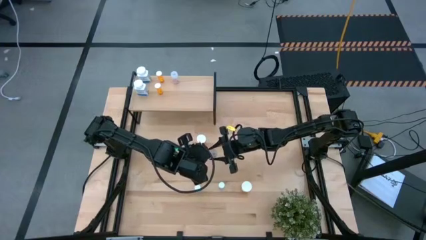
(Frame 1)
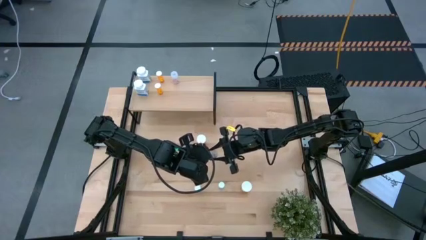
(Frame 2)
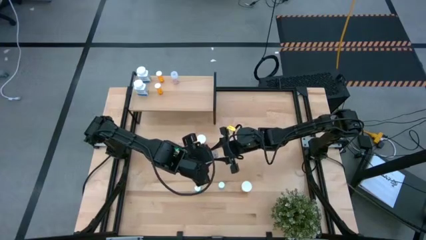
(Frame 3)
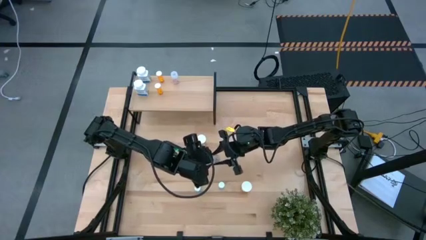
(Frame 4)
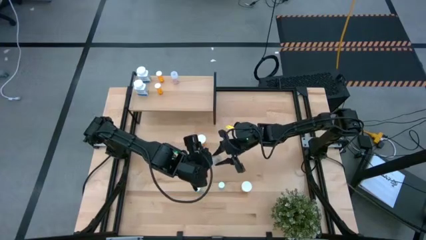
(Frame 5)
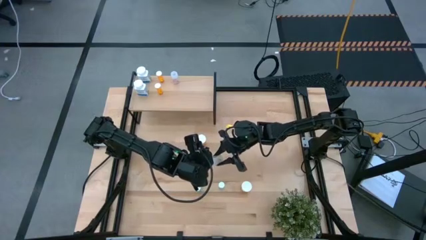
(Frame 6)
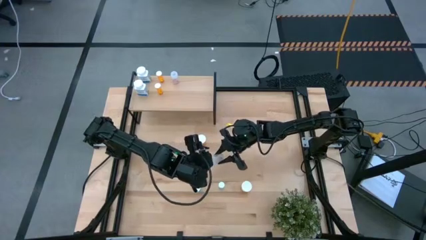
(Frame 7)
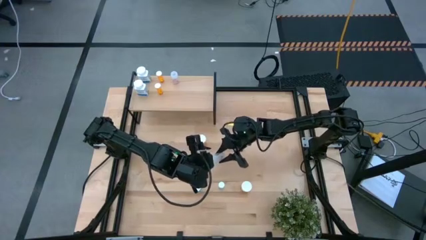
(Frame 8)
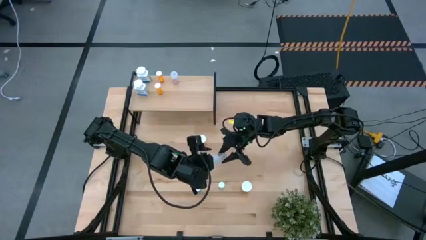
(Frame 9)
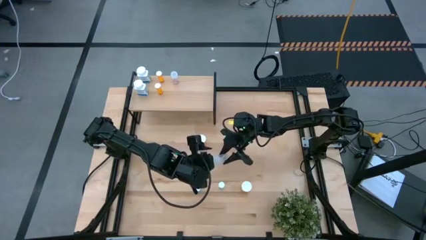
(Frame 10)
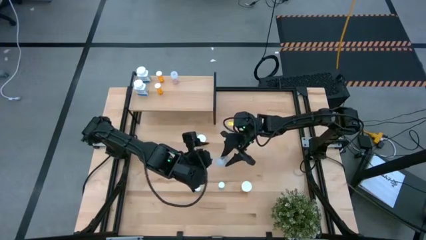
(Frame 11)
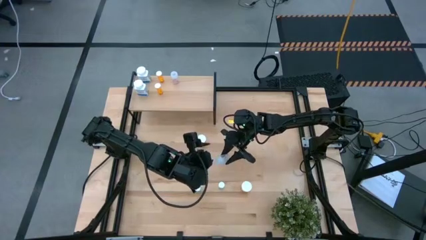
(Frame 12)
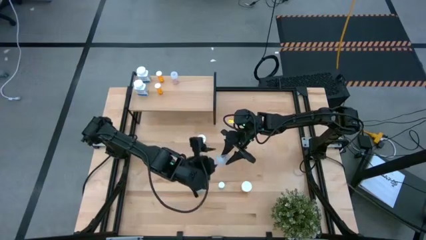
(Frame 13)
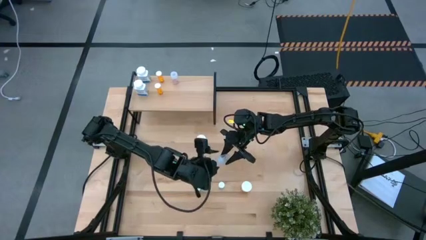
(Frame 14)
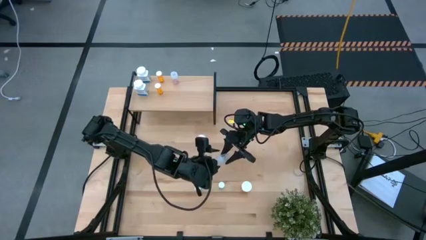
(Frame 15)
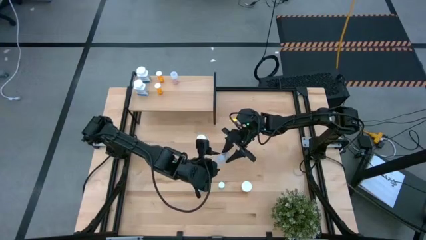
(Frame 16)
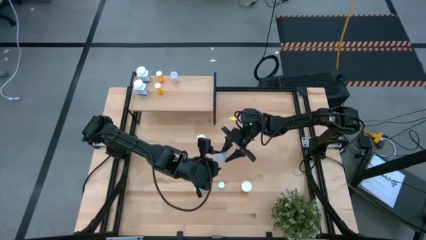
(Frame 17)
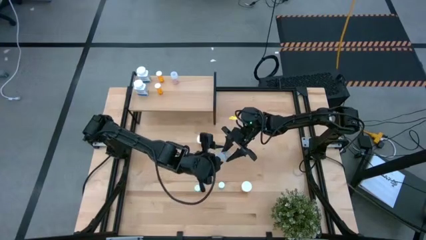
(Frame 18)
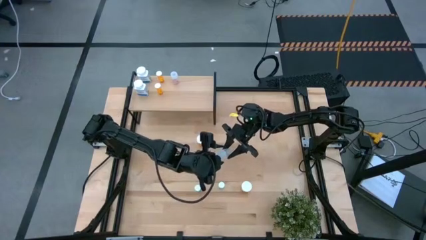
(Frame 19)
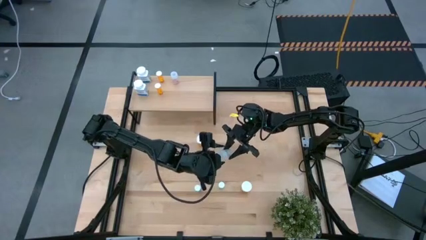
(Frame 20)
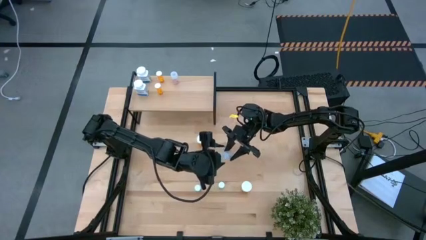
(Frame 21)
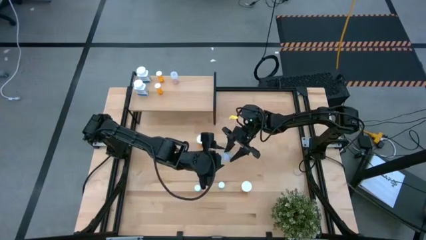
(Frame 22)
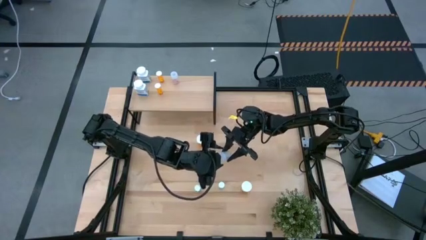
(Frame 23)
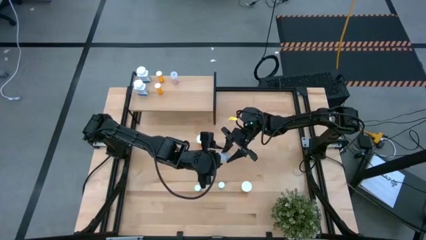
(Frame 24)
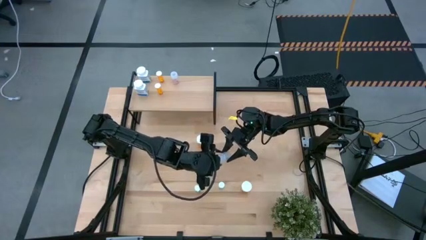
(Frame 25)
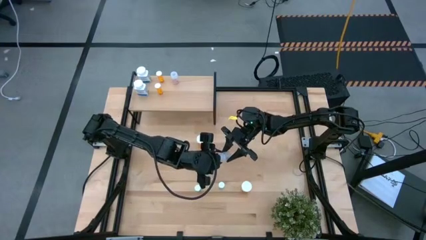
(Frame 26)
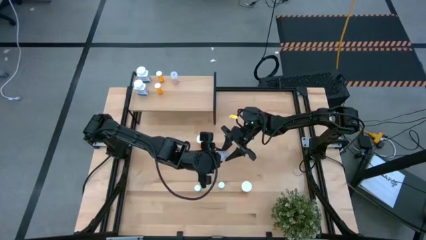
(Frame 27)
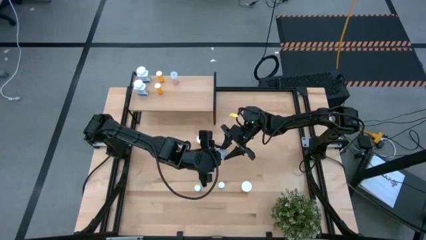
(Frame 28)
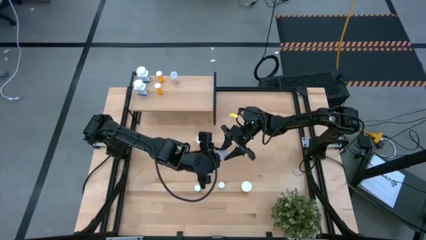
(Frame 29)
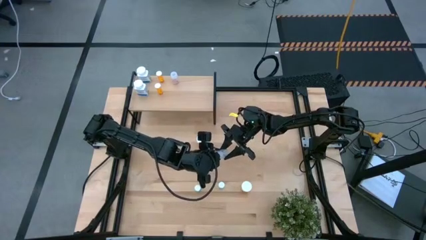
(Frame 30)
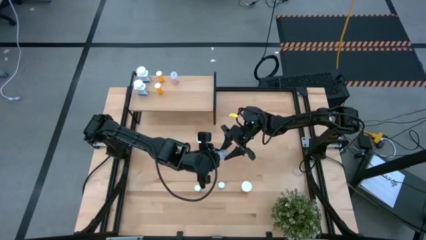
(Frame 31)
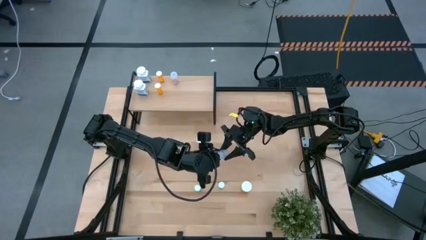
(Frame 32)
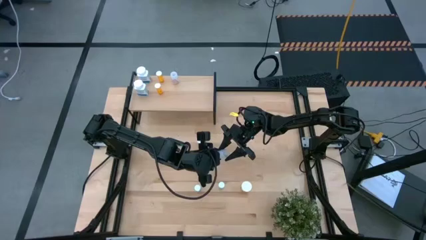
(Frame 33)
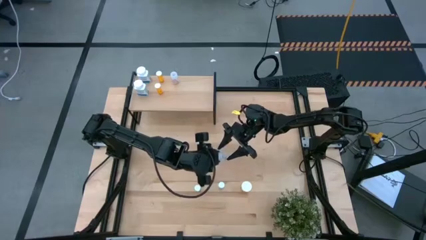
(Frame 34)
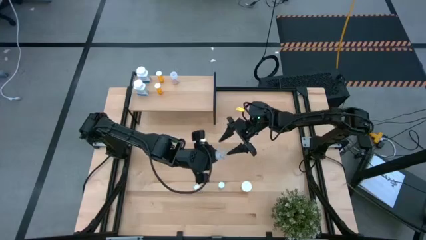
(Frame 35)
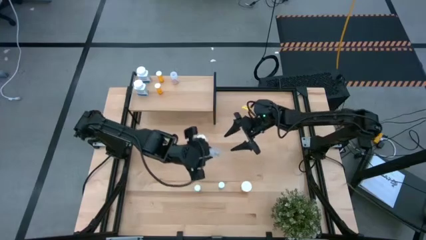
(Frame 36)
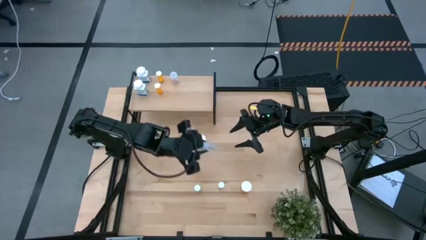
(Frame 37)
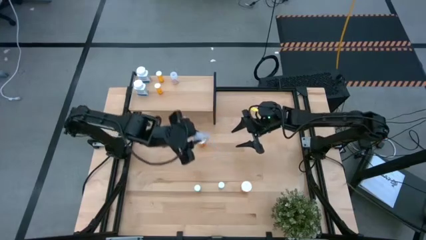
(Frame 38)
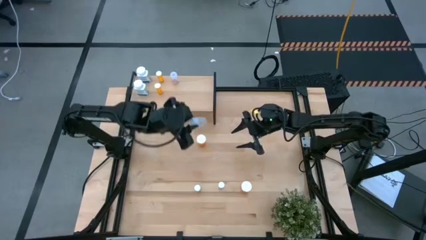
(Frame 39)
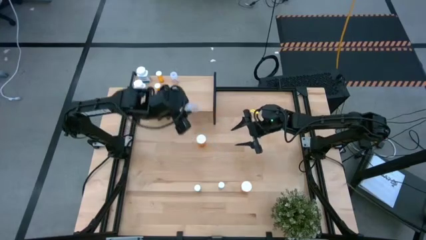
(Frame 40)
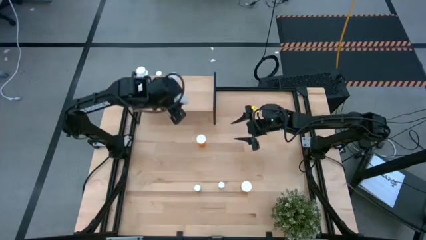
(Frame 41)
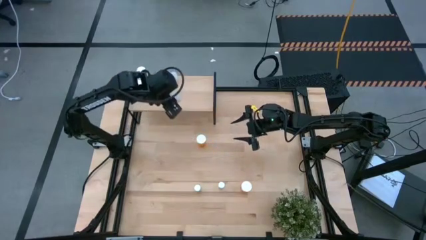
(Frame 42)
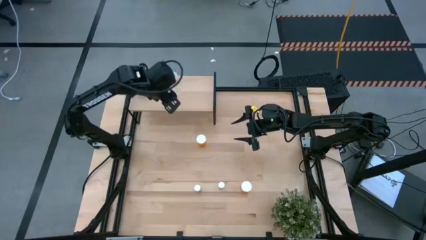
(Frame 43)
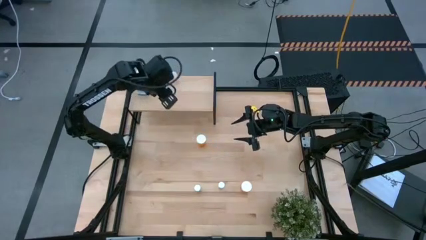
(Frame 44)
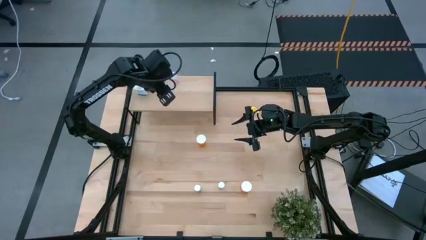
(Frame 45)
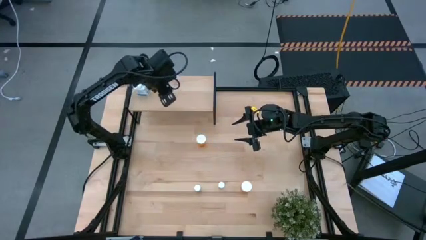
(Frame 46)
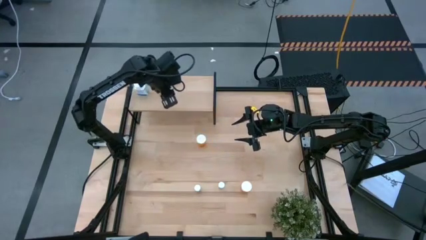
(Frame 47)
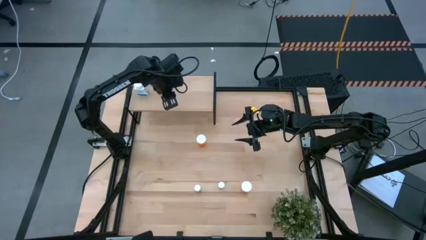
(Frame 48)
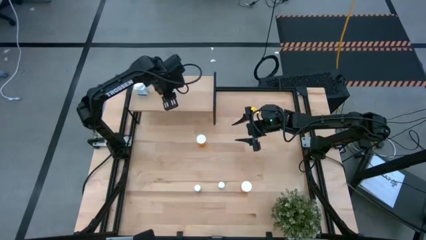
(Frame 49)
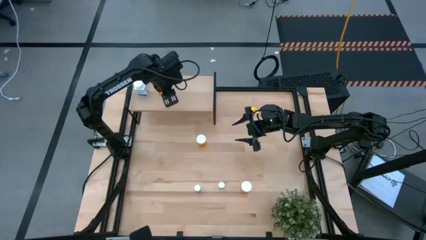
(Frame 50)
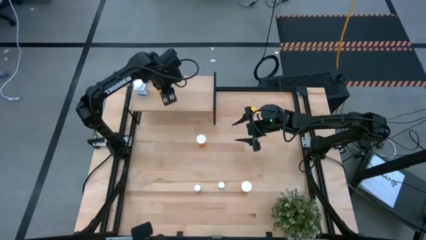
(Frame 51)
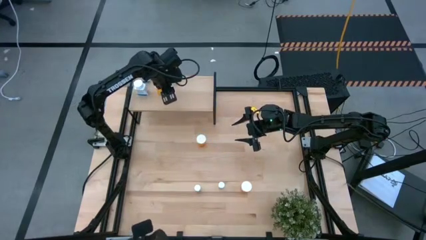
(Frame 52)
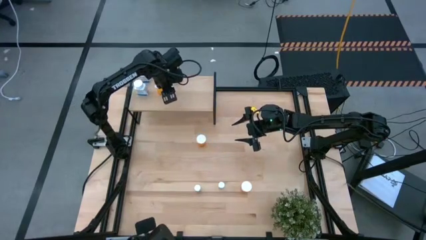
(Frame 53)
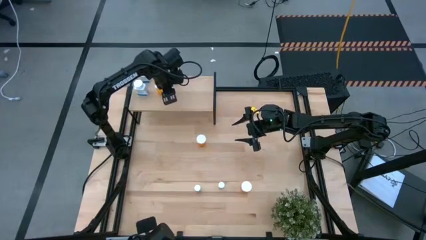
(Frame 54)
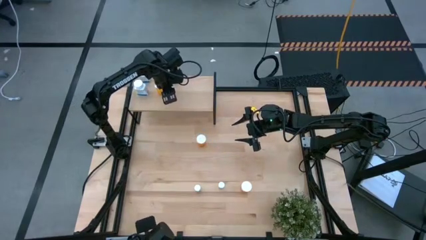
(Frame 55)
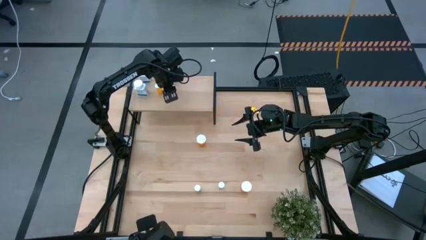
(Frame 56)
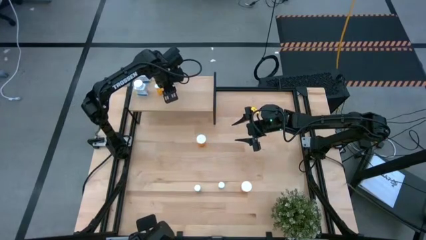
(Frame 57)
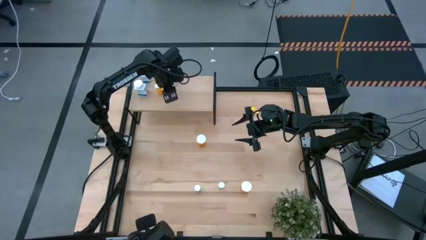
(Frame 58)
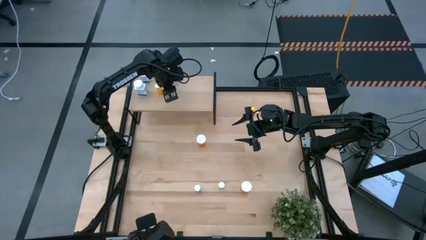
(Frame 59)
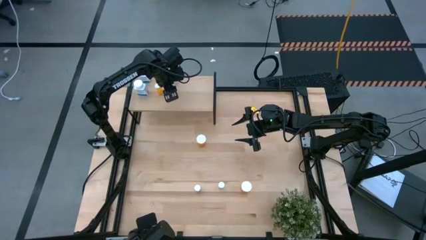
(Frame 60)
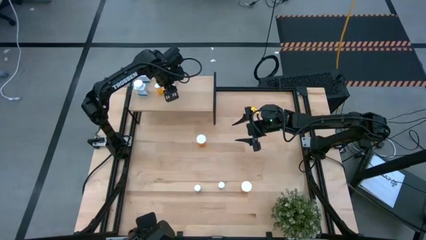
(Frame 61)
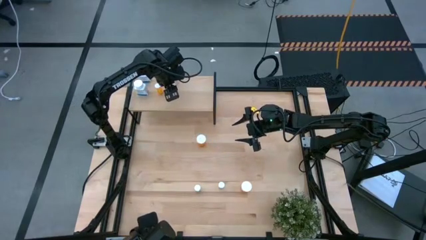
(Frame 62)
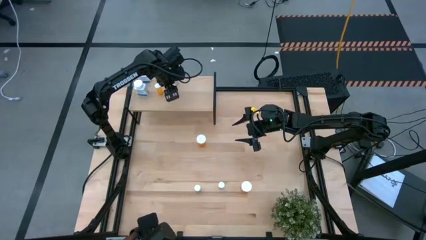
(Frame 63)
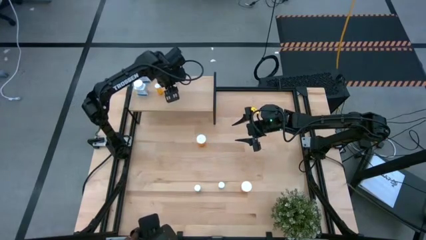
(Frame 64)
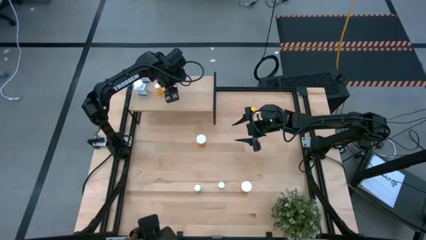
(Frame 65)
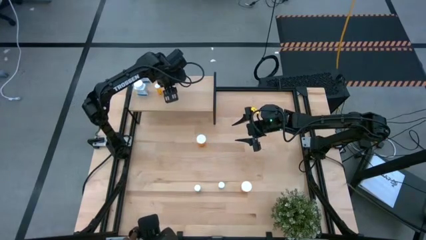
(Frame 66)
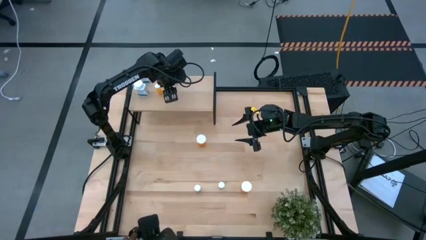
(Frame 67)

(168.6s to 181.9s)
Task: Pick and place medicine bottles onto shelf by color
Put the transparent pill bottle on the shelf aligned with the other transparent pill bottle

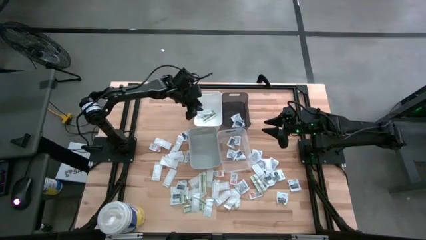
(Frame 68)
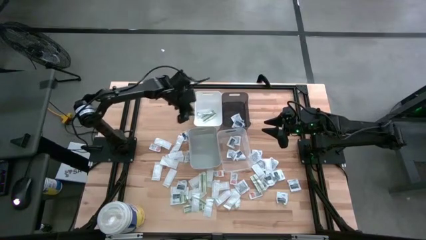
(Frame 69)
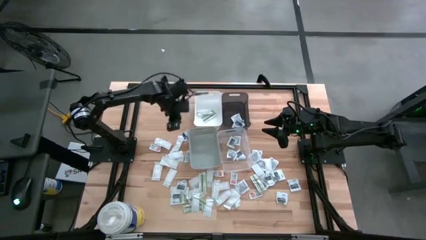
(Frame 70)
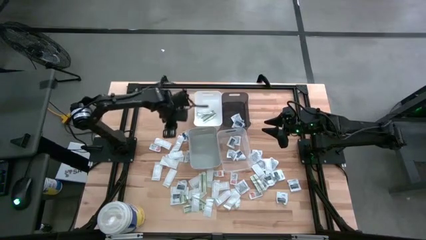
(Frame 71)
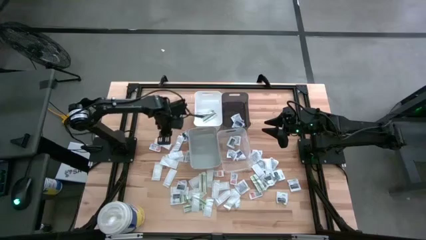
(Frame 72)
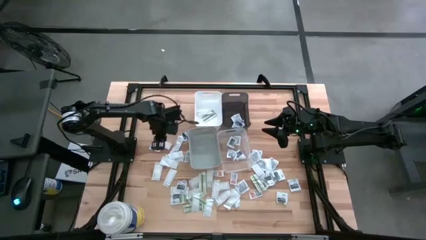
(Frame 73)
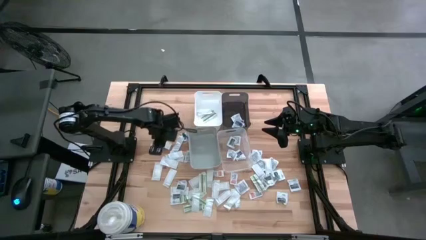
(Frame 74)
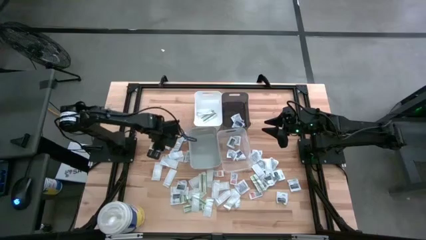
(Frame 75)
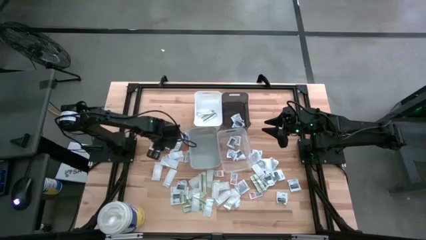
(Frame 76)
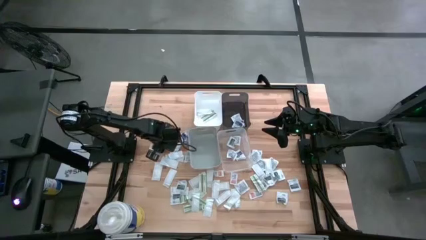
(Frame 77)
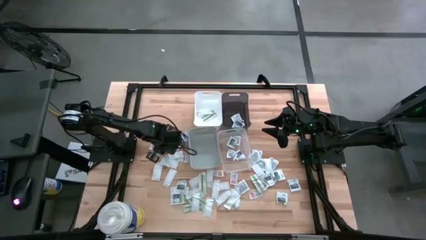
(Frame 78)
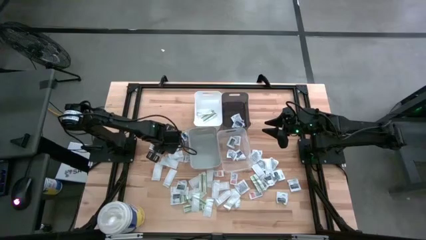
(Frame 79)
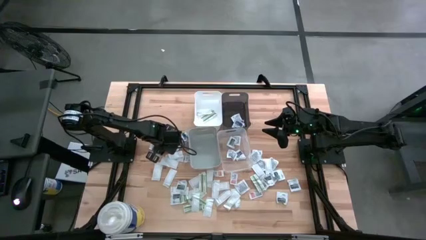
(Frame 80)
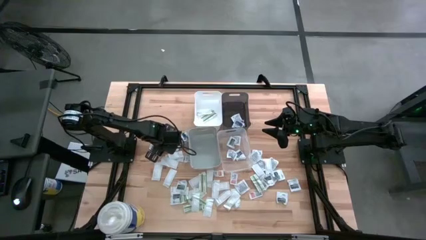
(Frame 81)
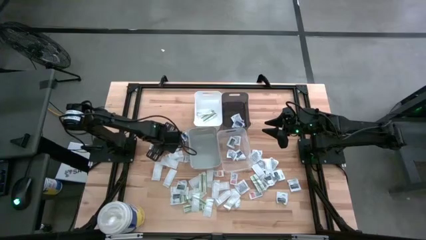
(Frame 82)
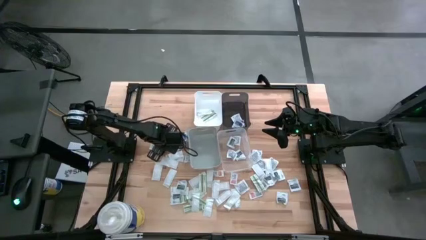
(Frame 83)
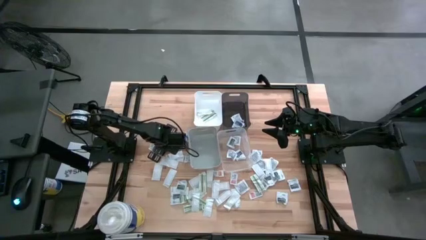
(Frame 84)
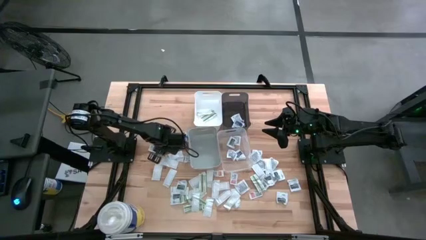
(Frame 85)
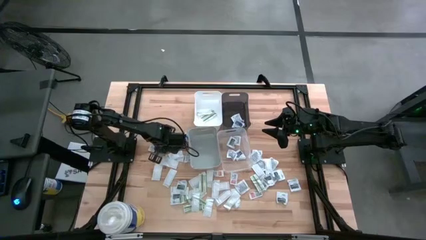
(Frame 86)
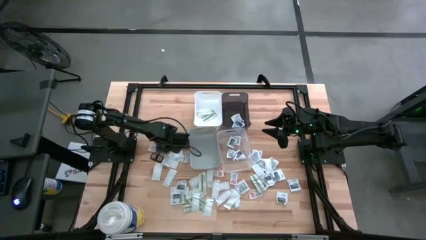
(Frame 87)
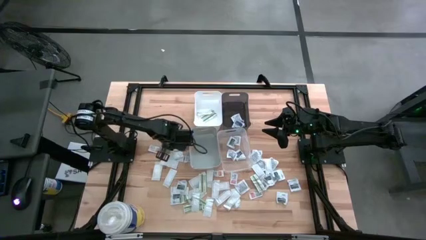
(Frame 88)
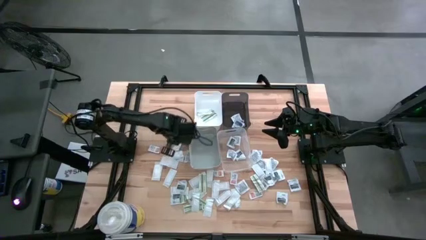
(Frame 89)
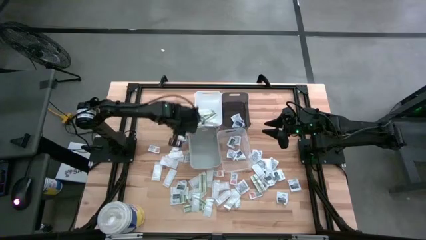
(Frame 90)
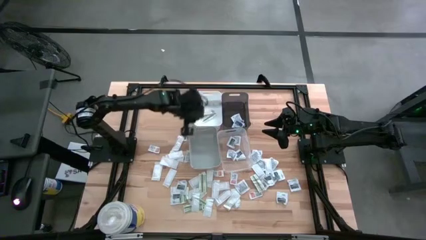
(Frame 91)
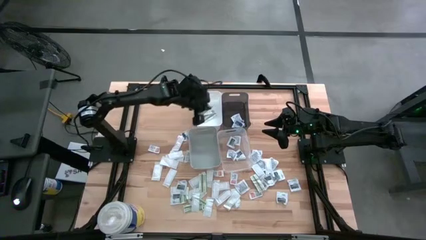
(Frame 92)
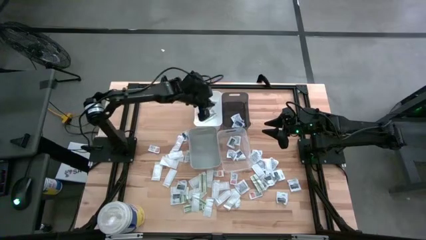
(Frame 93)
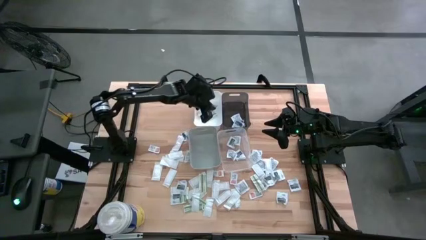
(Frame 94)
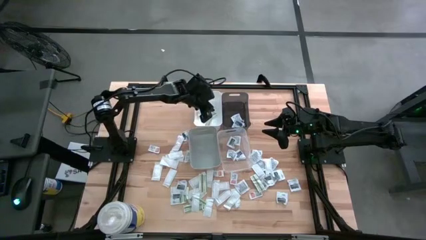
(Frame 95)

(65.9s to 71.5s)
Task: Pick & Place First Aid Supplies
Put the green bandage pack into the white bin
